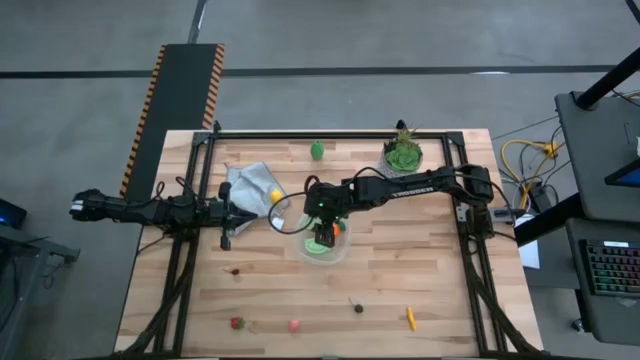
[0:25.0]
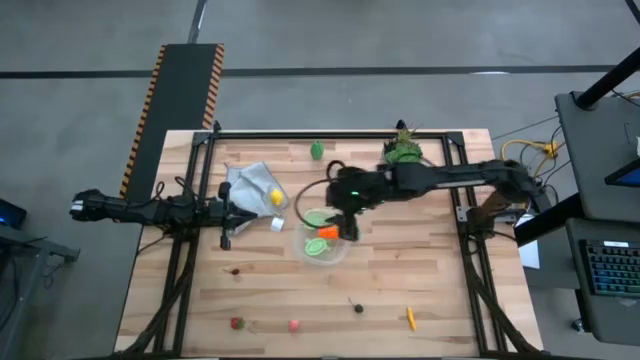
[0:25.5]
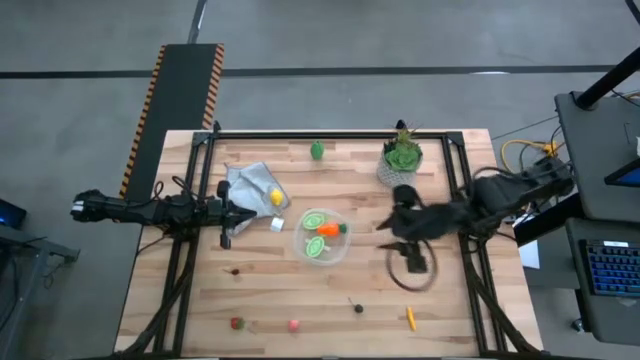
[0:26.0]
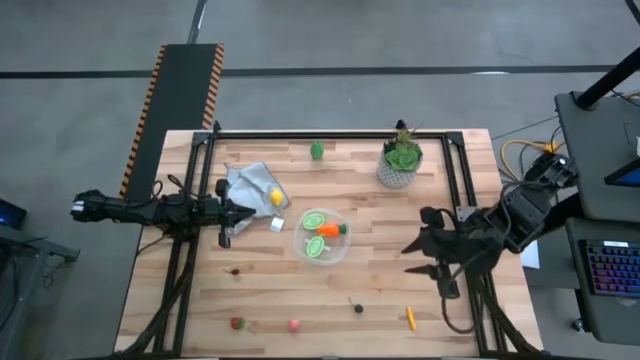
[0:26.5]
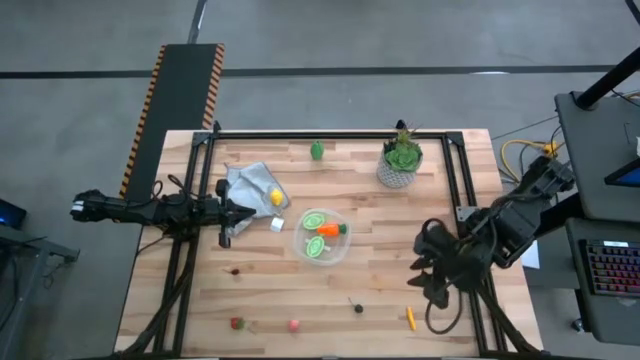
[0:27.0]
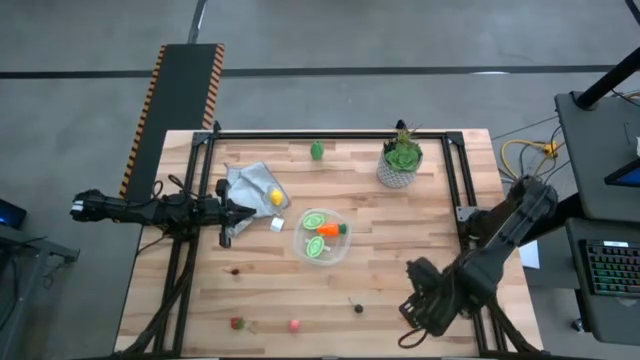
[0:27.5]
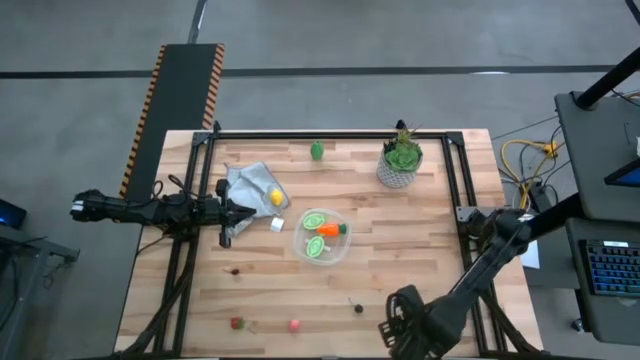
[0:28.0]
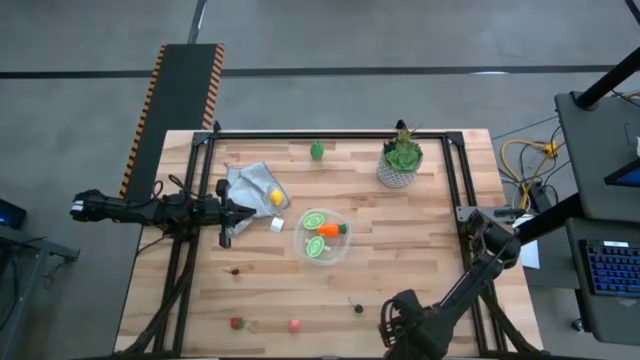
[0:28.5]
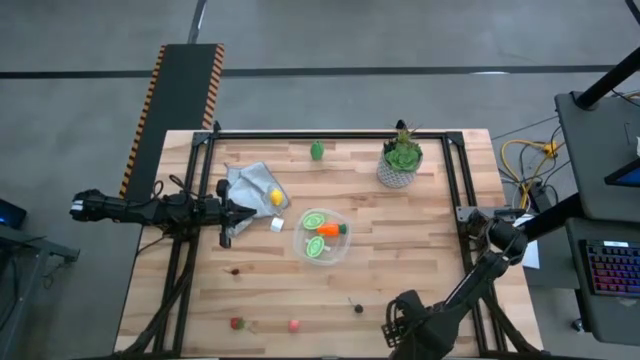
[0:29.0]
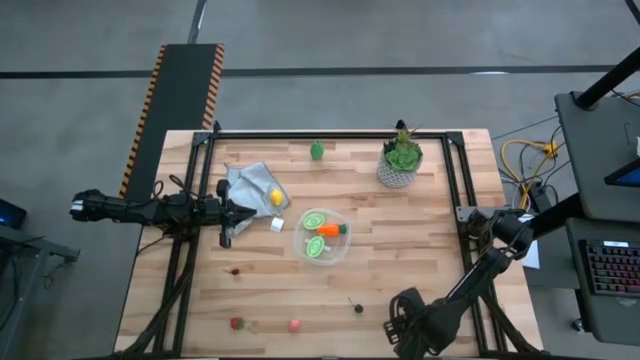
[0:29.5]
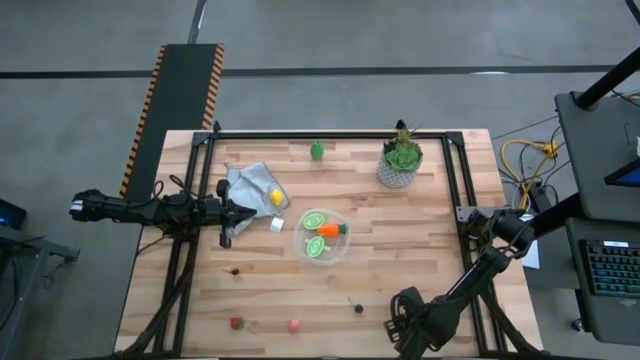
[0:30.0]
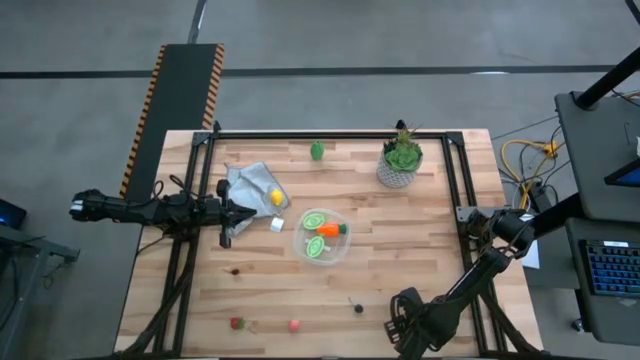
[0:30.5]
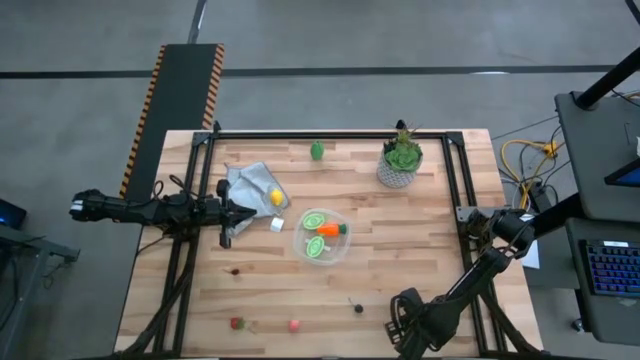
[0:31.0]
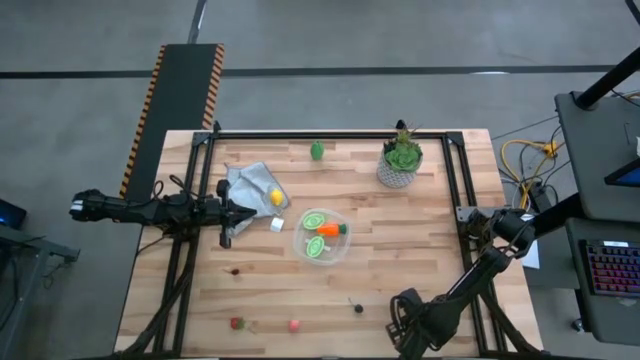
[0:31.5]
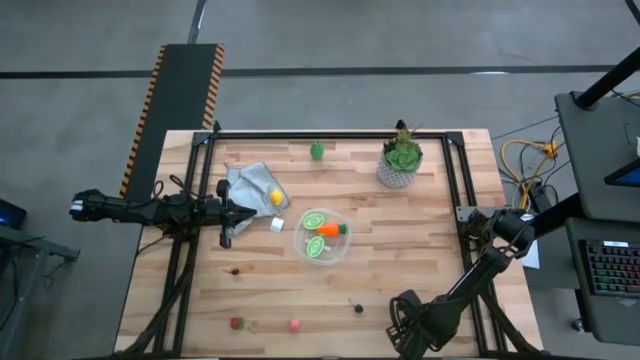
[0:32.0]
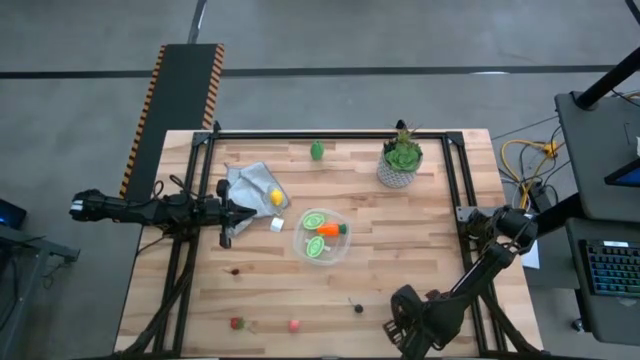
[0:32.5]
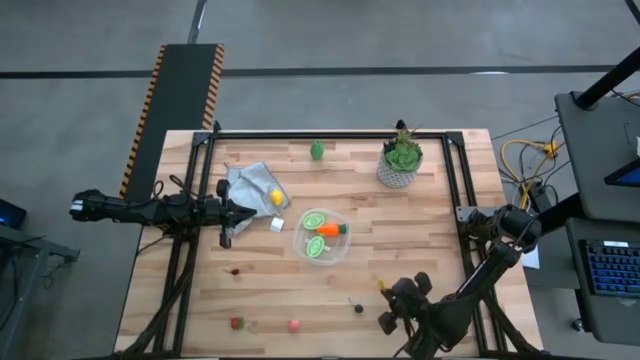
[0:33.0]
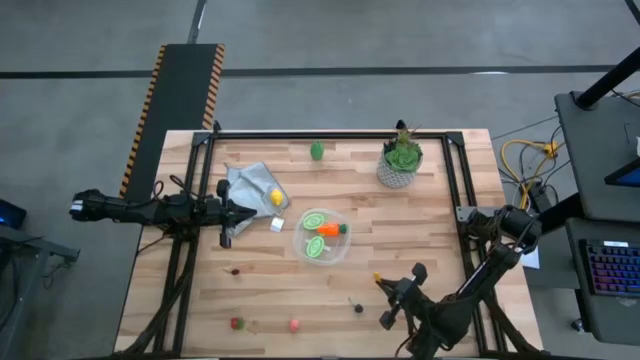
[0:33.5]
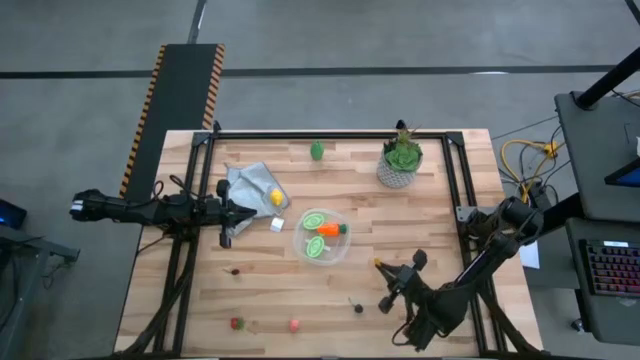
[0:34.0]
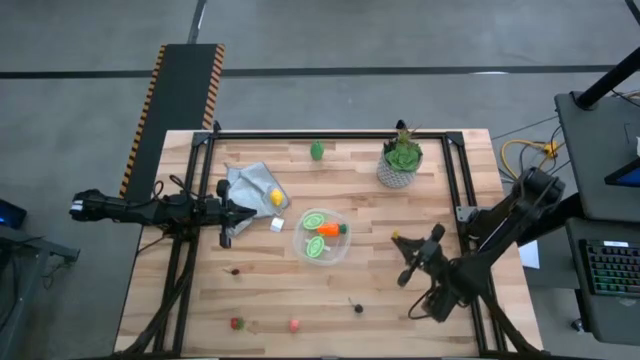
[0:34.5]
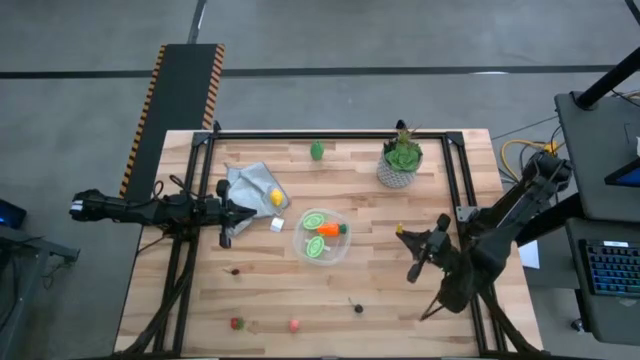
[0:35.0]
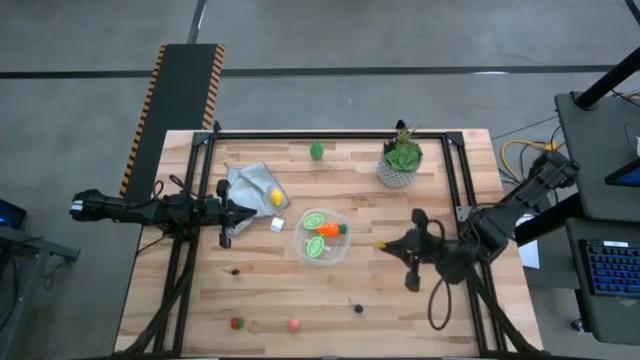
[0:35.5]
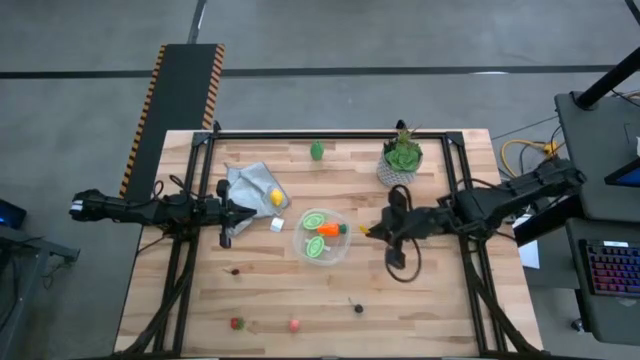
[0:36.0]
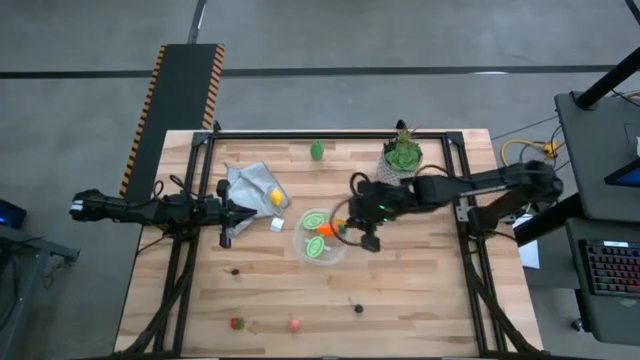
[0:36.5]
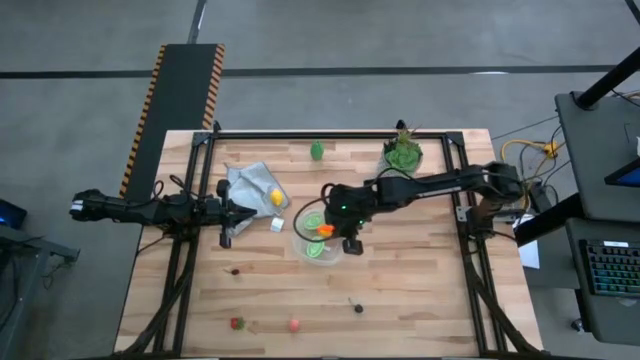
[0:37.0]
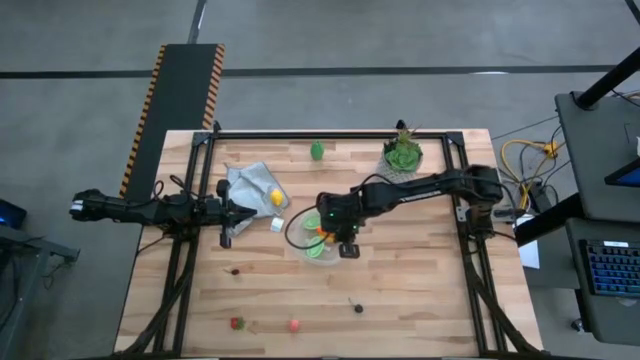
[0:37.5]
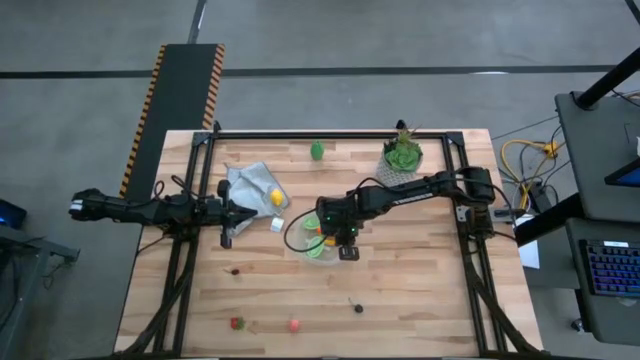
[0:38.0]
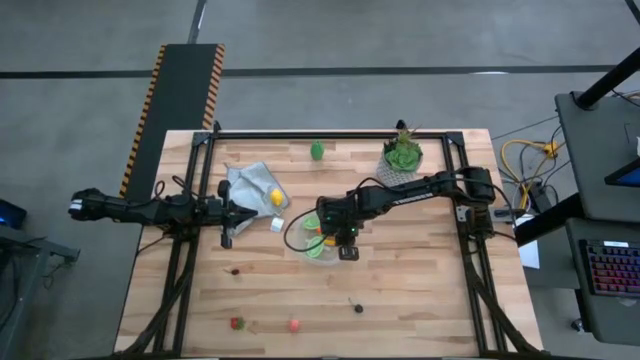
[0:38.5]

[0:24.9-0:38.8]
Task: Pick and placing Produce into tupperware
Put the yellow corn into the transparent bin

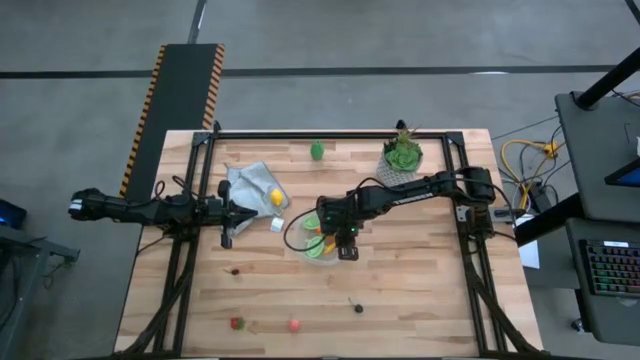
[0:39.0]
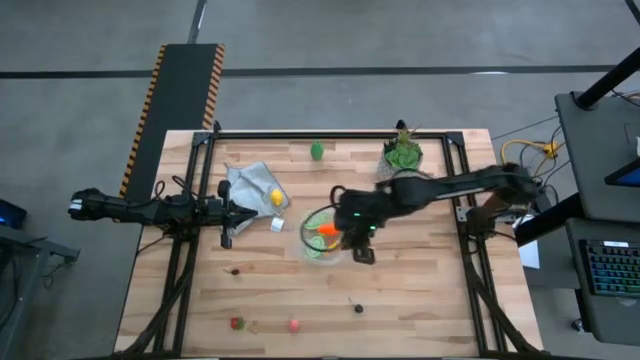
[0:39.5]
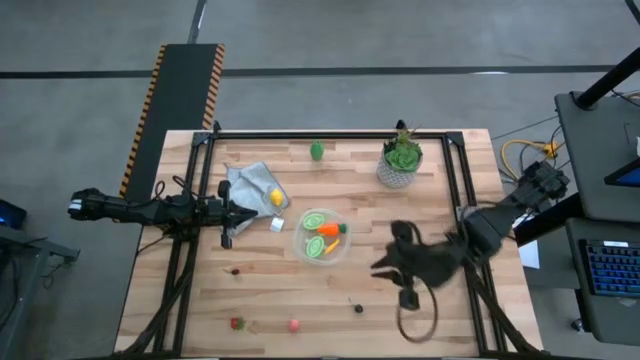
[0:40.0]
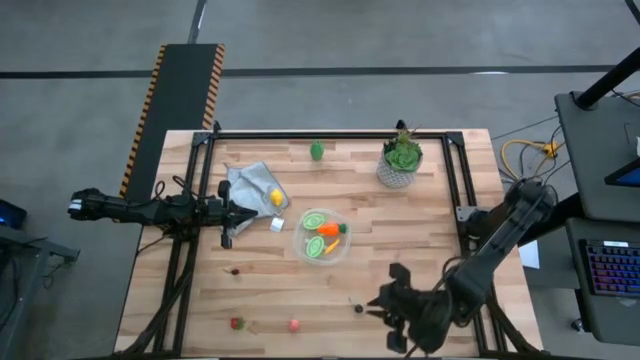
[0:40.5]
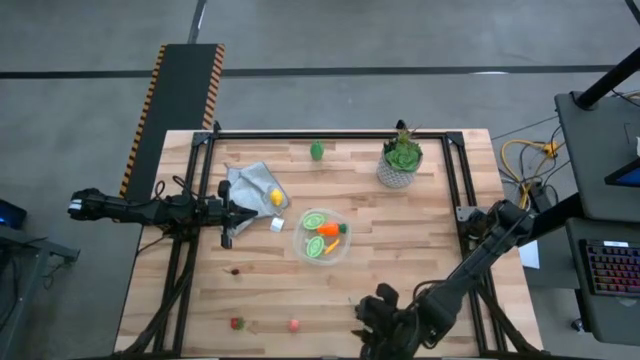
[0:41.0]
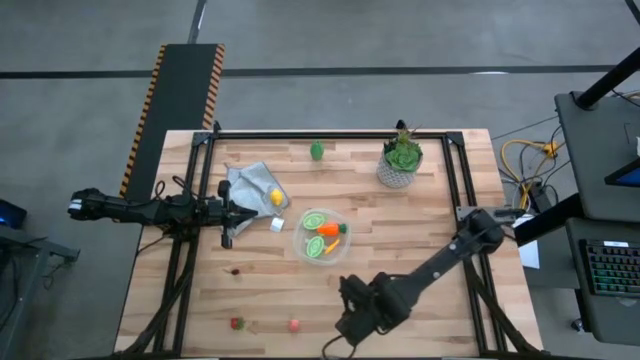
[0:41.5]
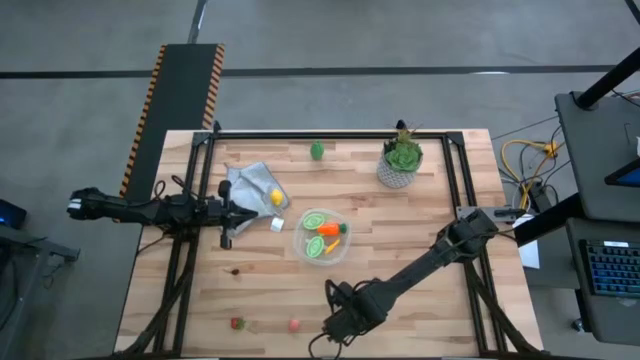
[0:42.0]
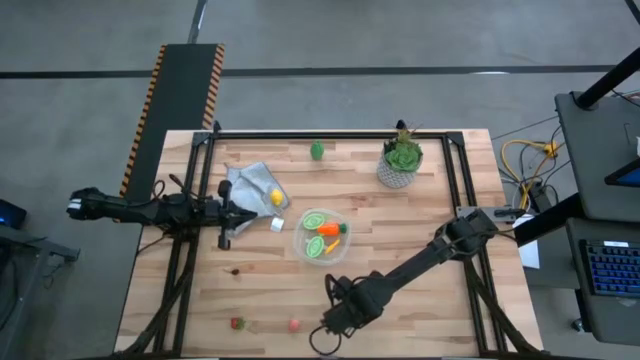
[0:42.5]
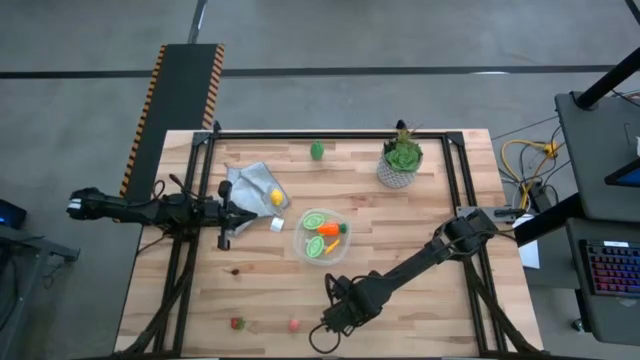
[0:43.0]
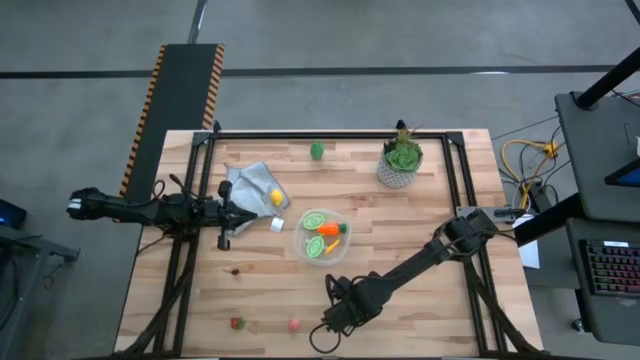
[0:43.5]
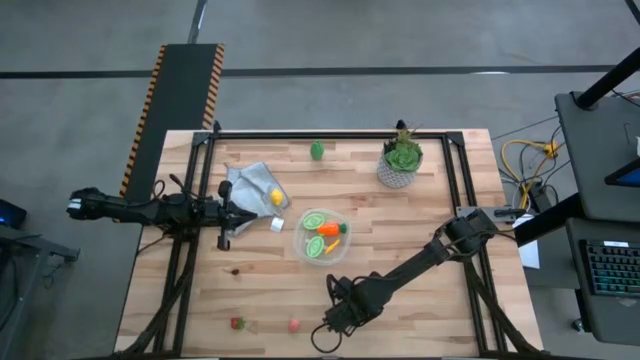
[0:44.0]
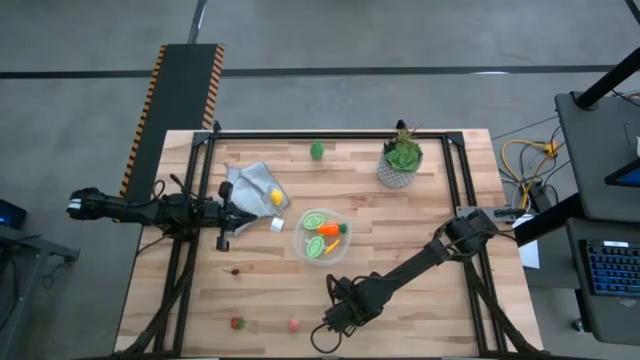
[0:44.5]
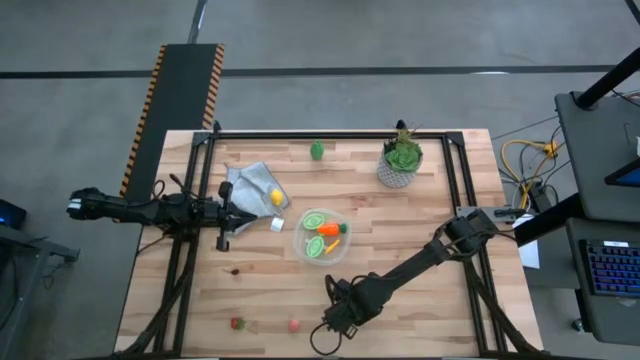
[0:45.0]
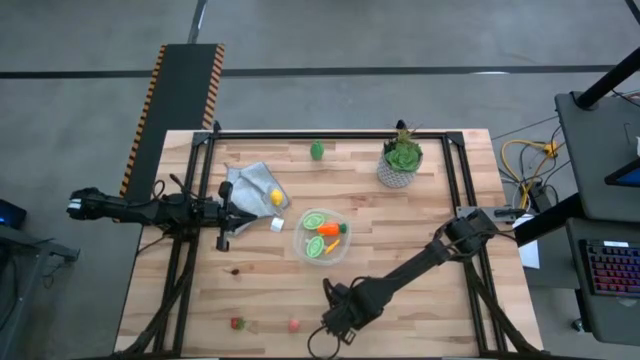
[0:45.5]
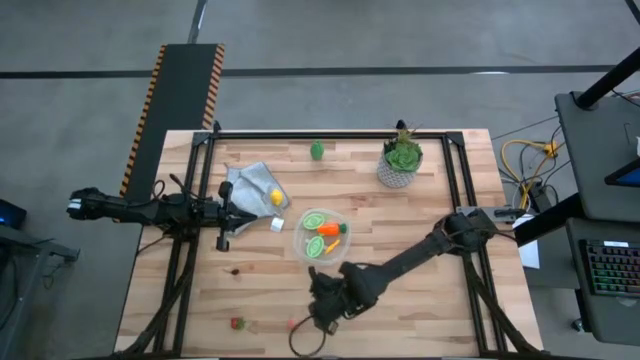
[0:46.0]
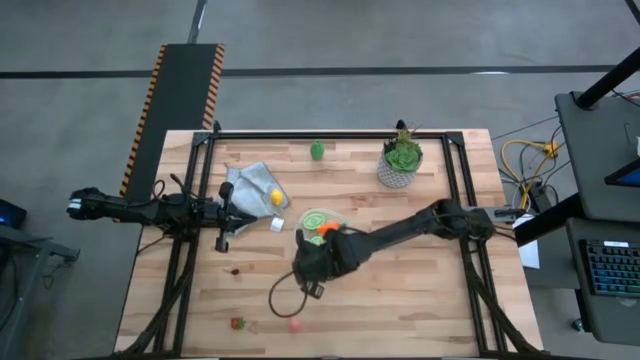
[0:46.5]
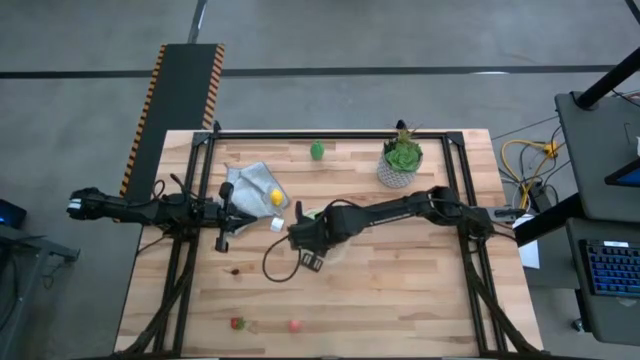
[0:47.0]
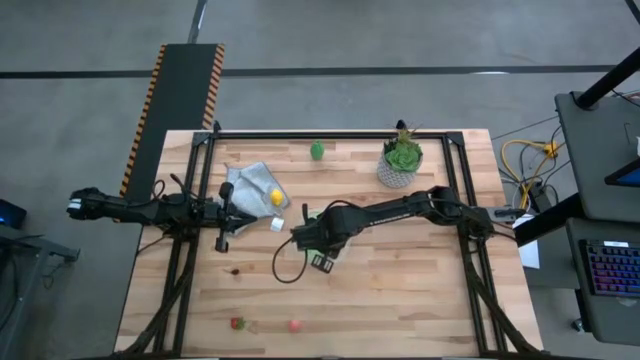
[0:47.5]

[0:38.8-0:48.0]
Put the black cherry into the transparent bin
